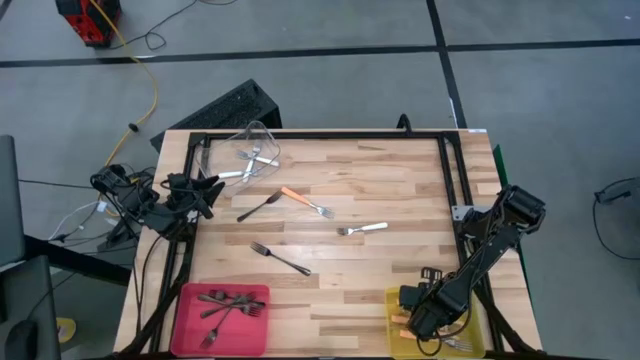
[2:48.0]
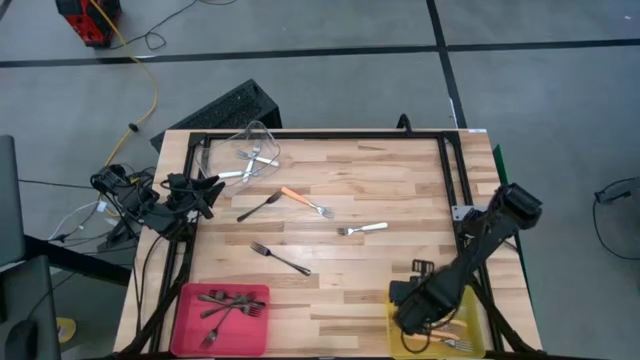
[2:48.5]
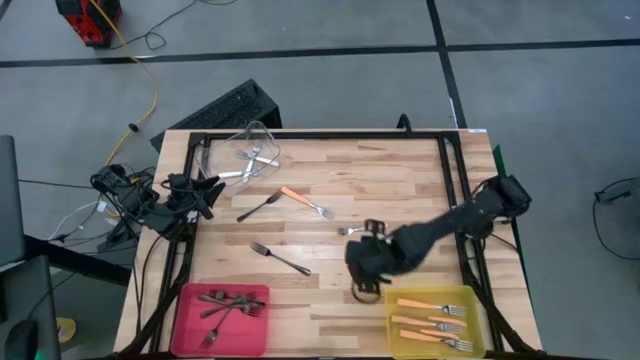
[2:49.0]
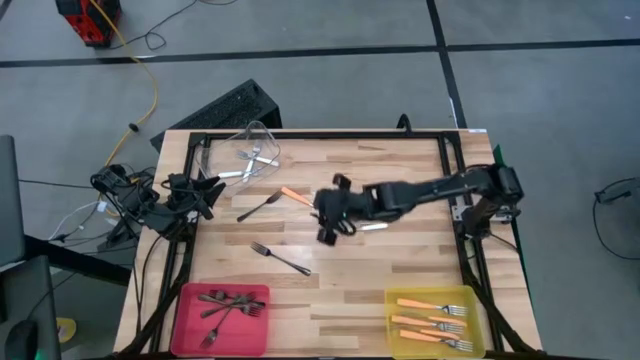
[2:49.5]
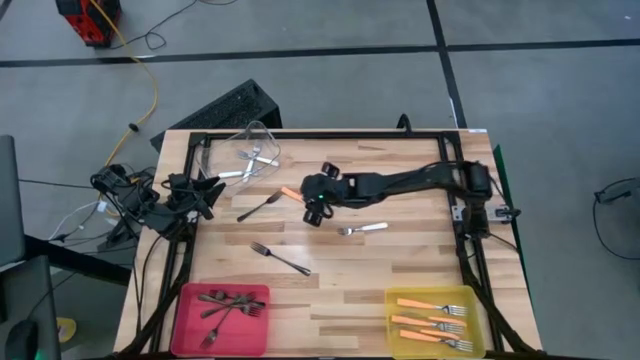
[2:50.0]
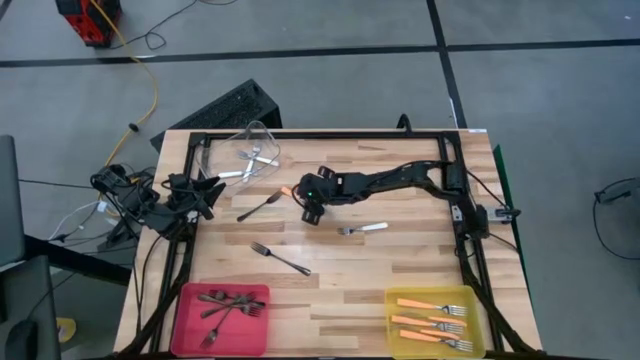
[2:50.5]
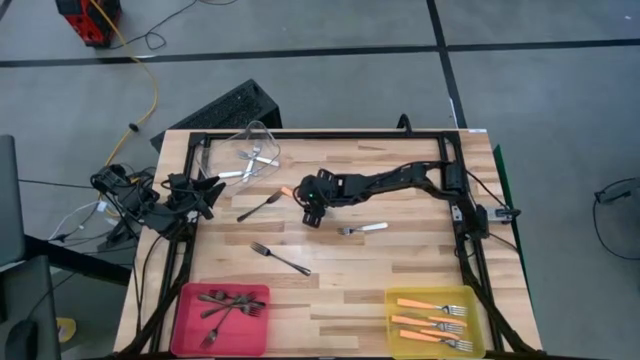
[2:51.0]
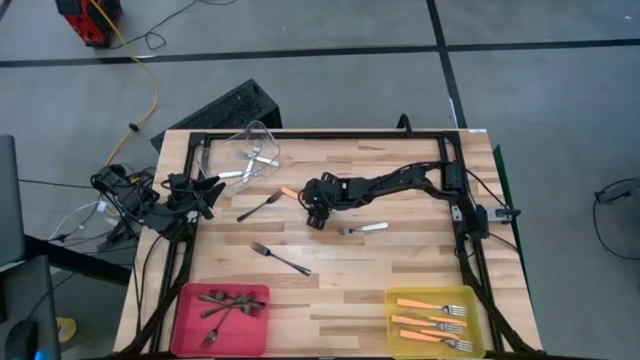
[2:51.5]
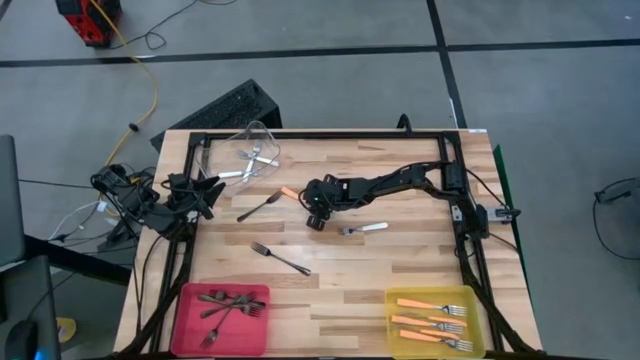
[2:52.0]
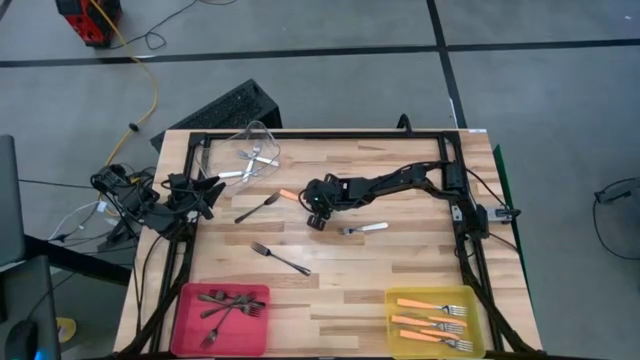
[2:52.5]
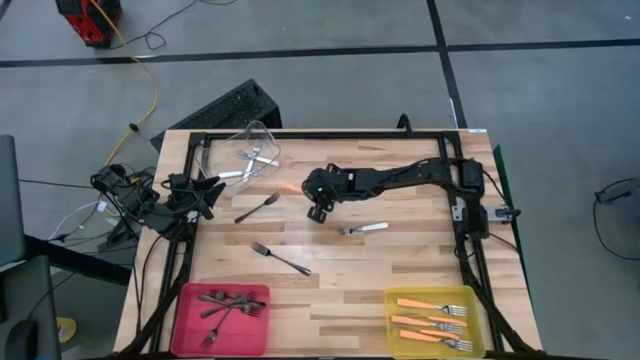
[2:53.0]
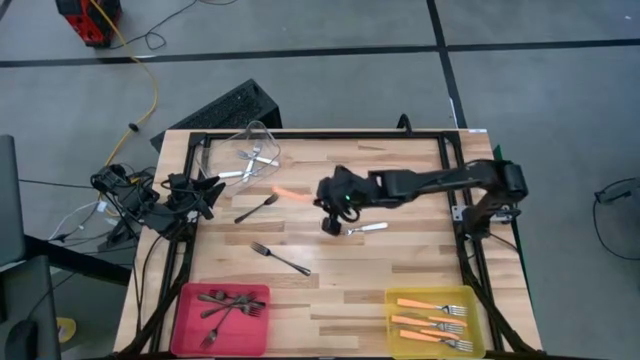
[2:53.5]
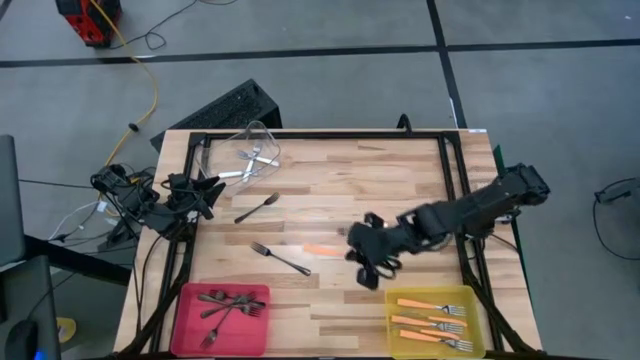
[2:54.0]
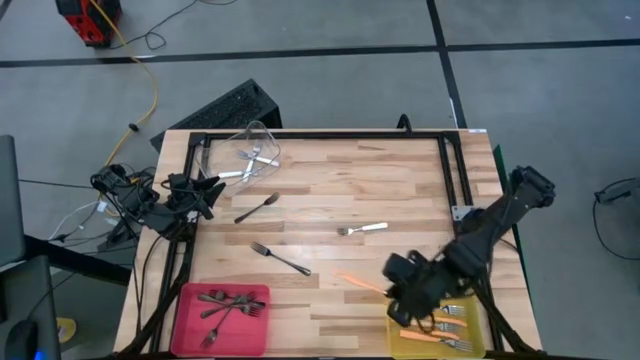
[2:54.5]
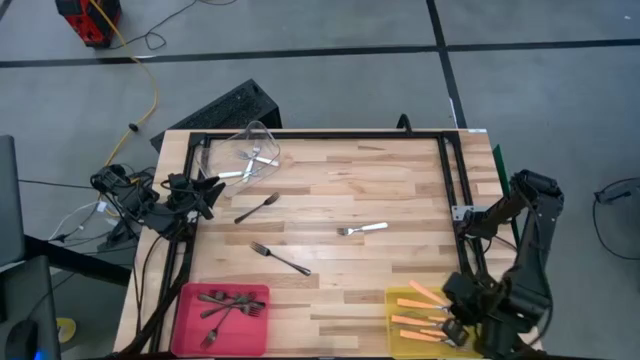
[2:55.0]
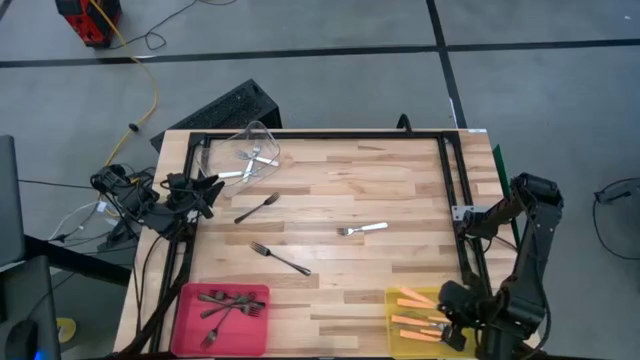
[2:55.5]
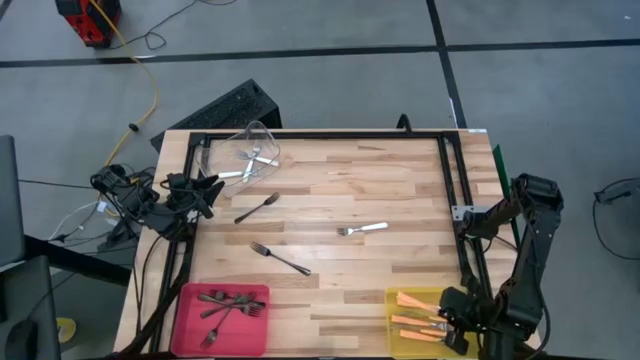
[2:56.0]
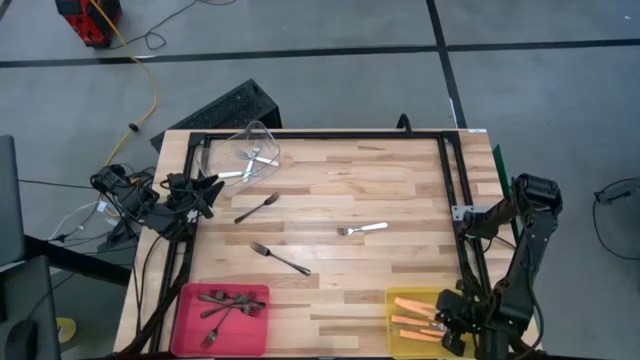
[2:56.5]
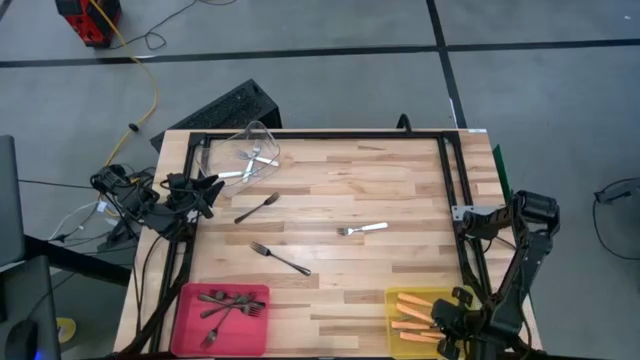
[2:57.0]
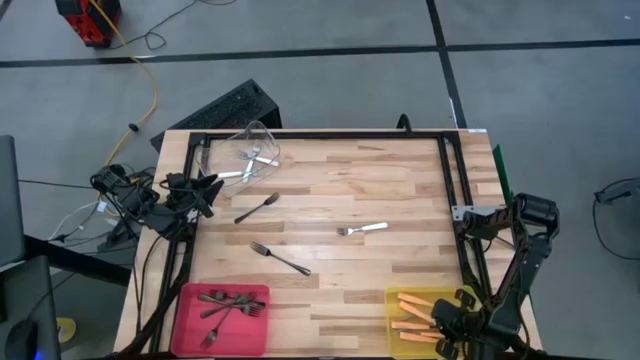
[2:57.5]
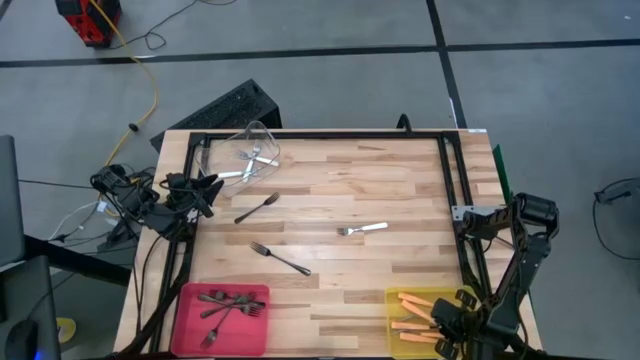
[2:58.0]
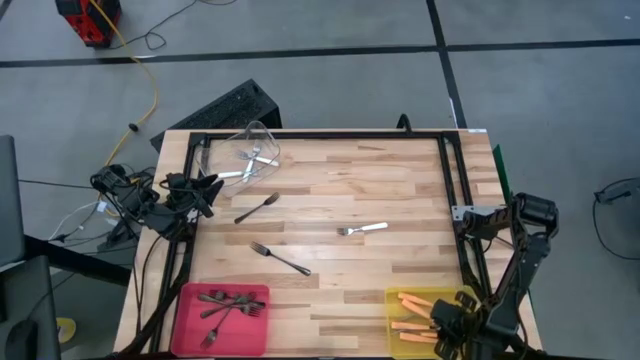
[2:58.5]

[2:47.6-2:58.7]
Task: Sort silverware by color (type)
Put the orange fork into the yellow bin

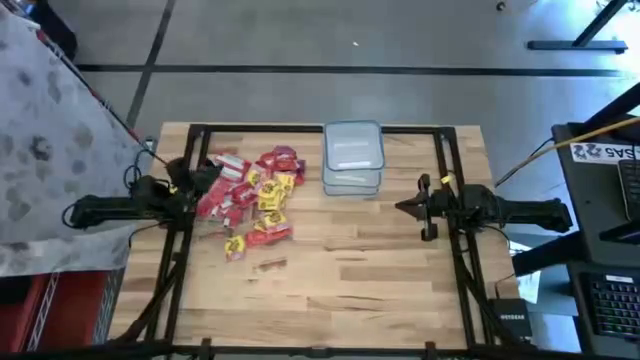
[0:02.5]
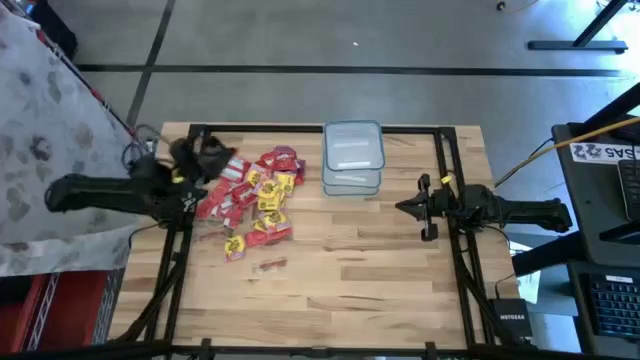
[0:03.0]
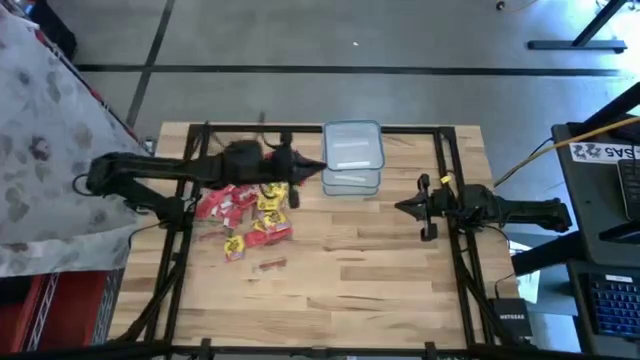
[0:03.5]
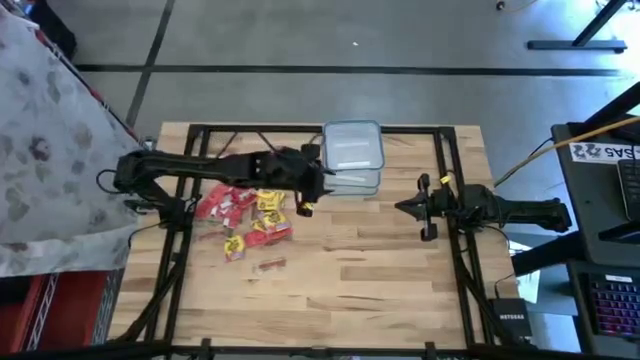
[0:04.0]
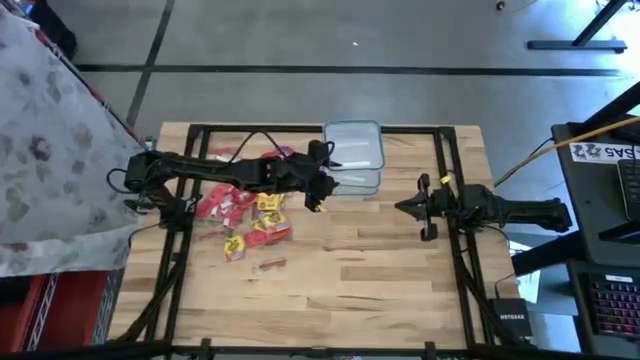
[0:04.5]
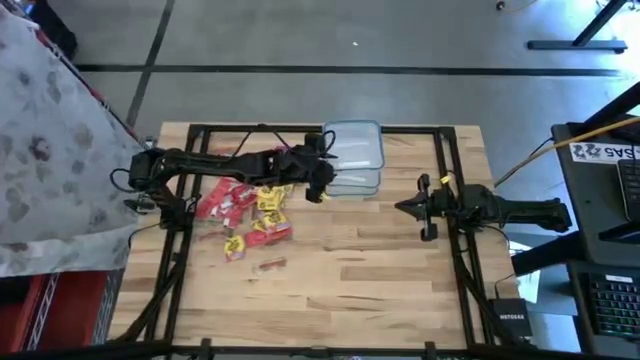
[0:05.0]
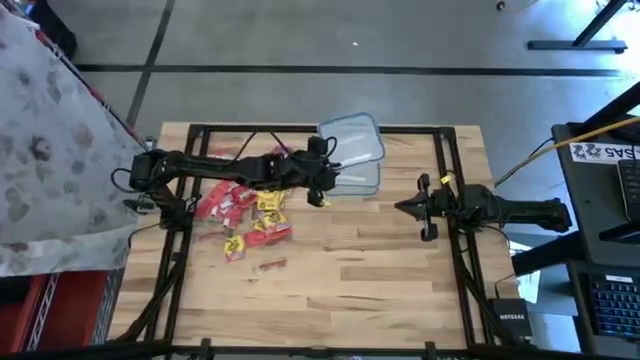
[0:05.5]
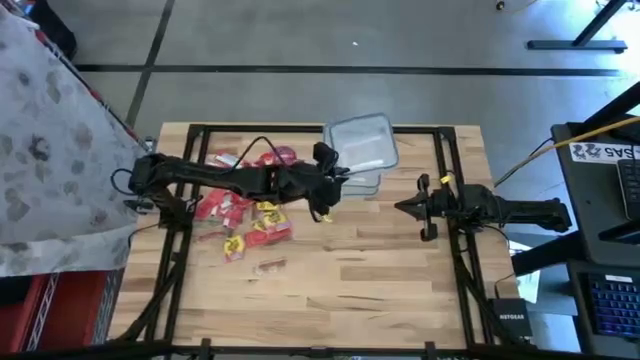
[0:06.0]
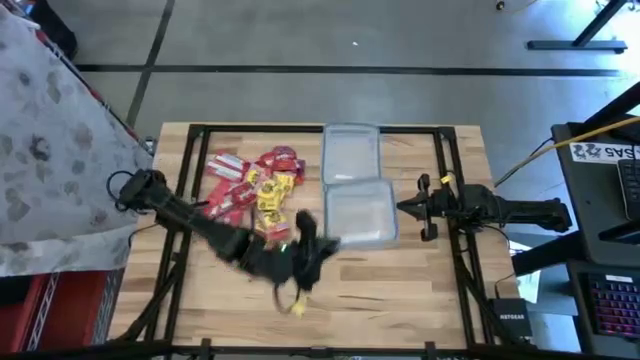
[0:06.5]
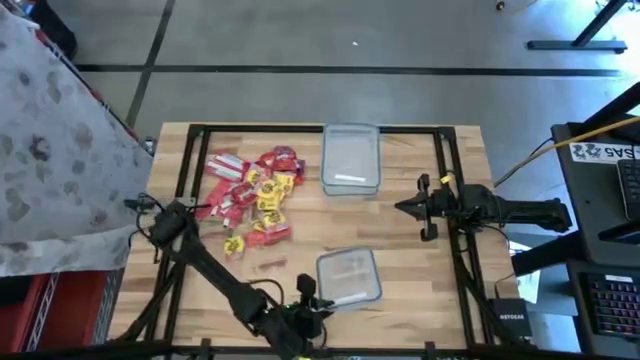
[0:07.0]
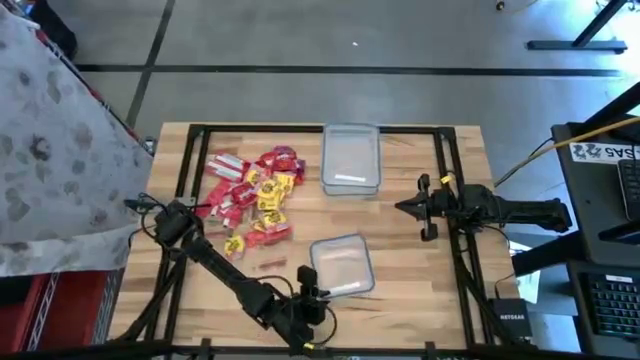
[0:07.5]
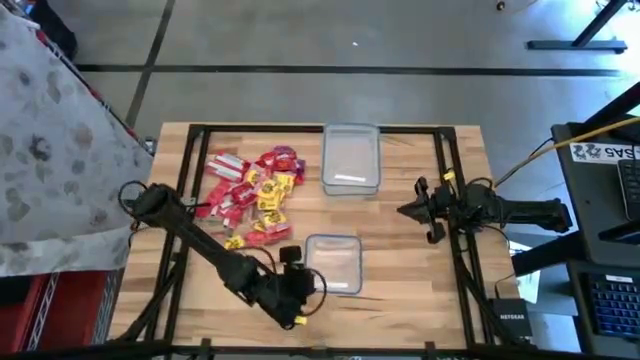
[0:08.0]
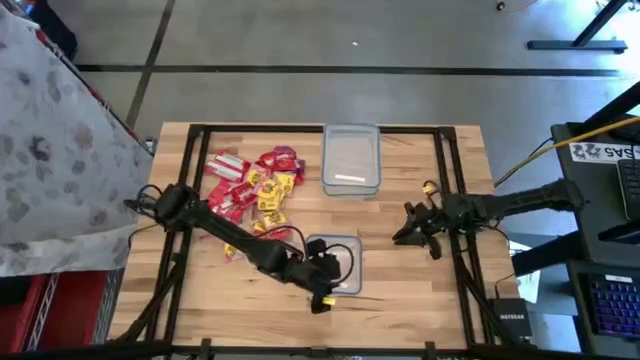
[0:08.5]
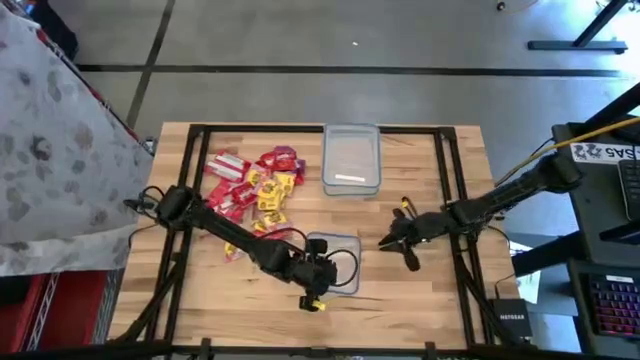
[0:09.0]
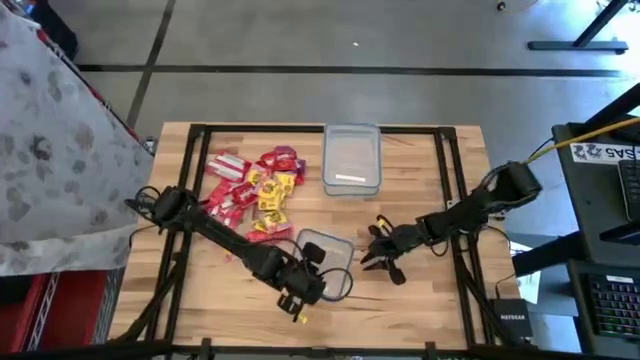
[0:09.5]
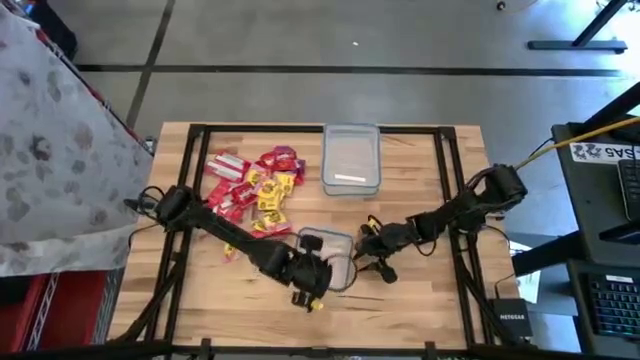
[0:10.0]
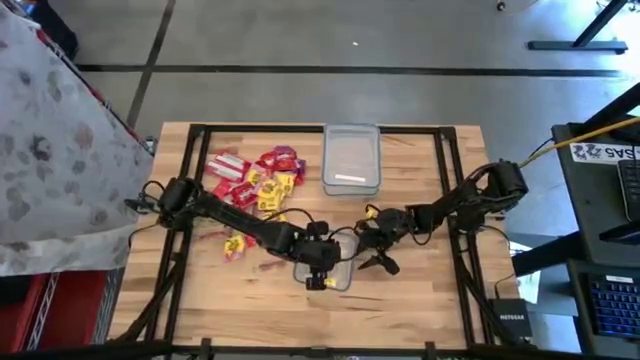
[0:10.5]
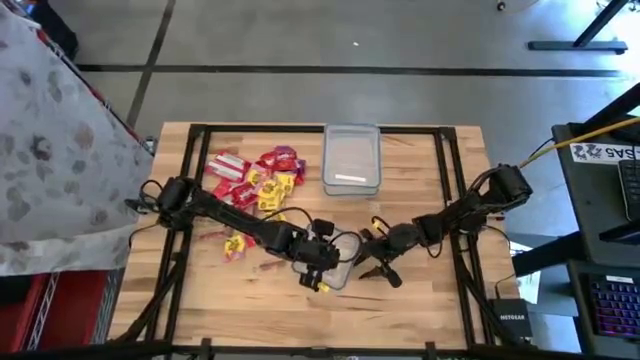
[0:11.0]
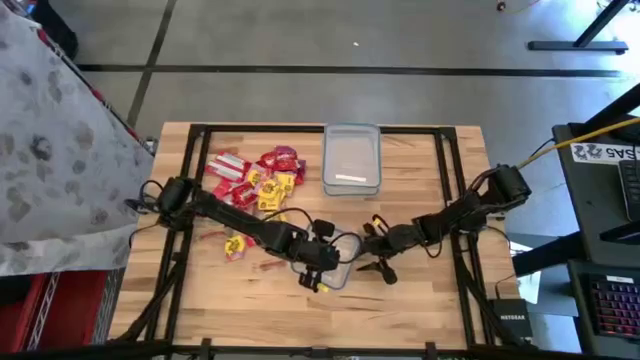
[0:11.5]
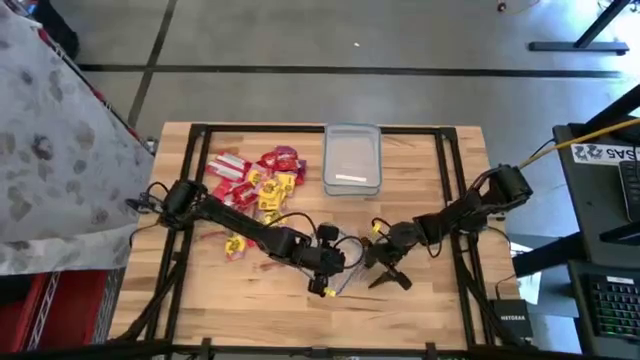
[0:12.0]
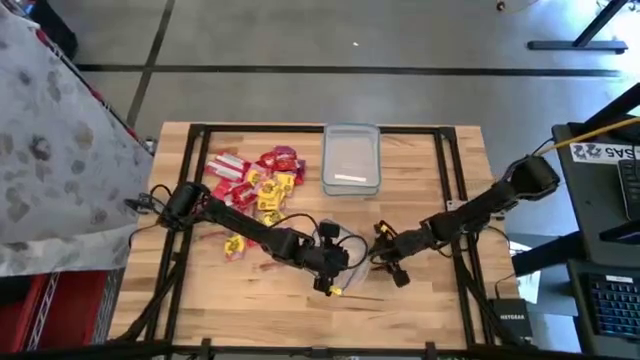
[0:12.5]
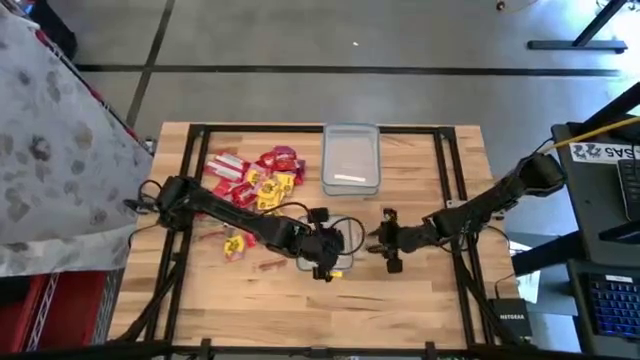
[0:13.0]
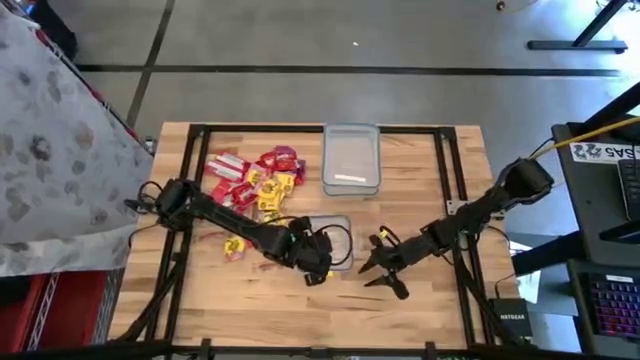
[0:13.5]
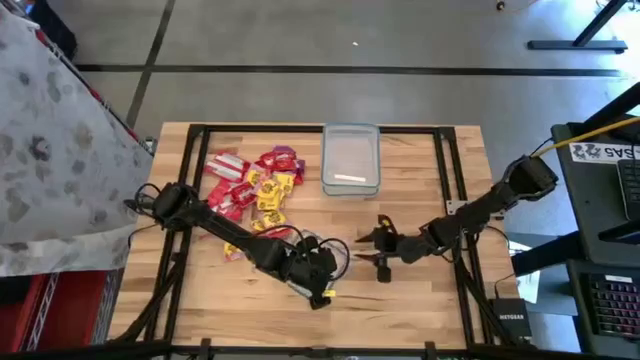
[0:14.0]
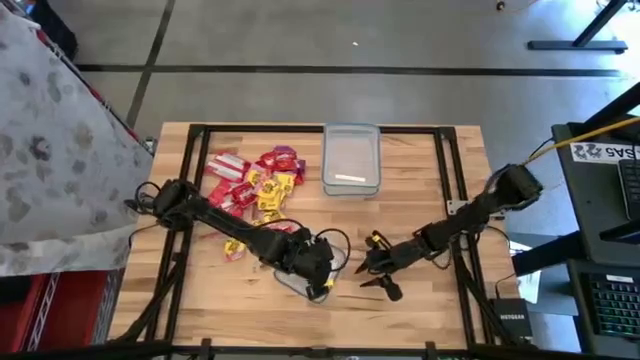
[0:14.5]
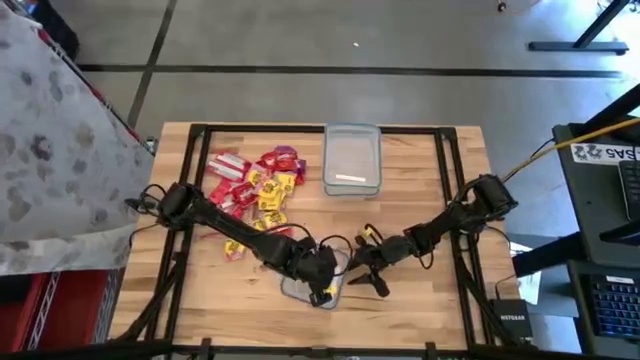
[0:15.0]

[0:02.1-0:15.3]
Task: Sort candy
Open the square transparent food container
